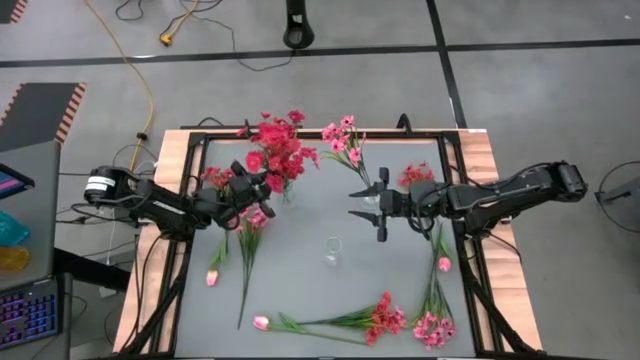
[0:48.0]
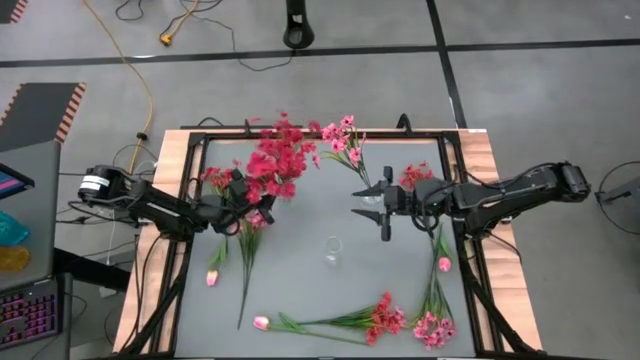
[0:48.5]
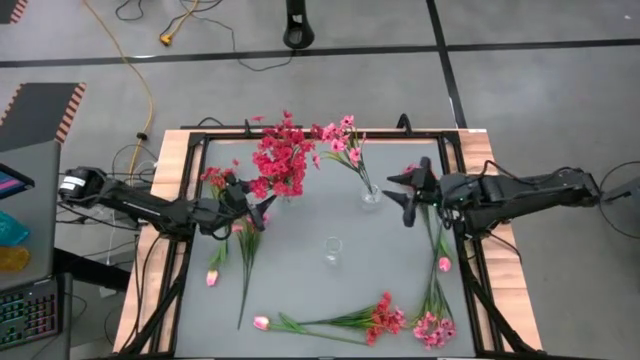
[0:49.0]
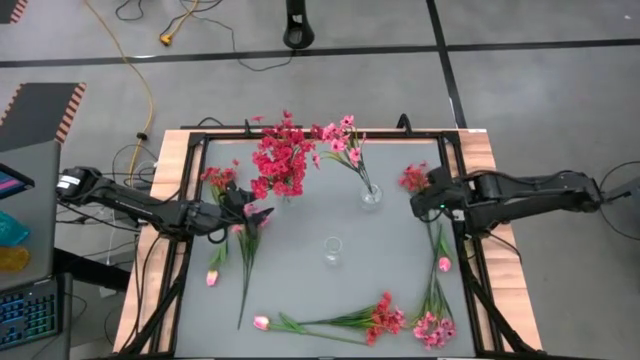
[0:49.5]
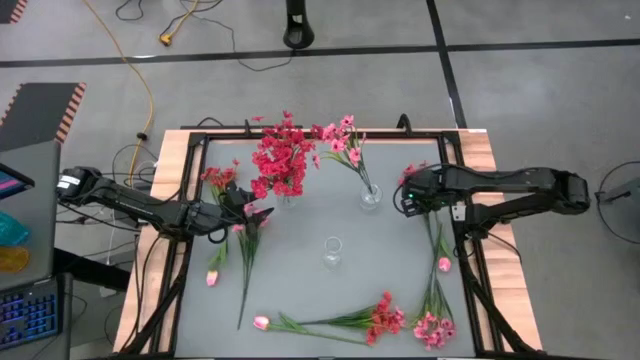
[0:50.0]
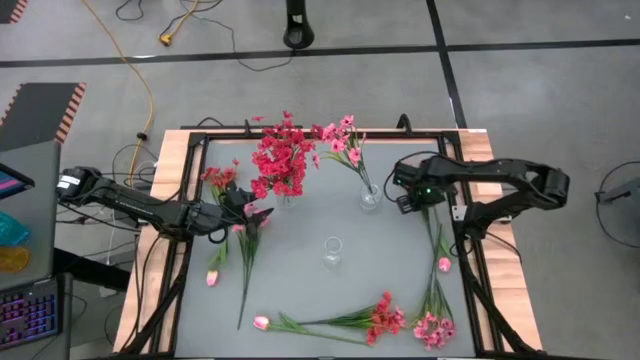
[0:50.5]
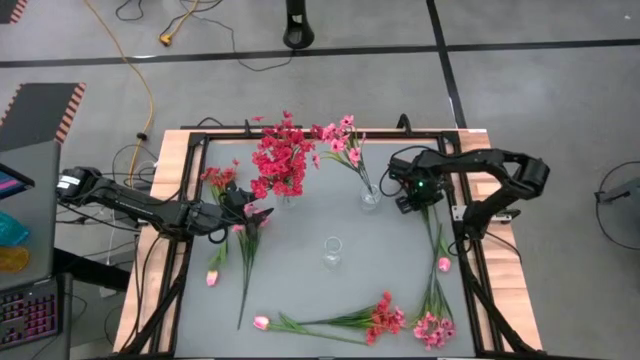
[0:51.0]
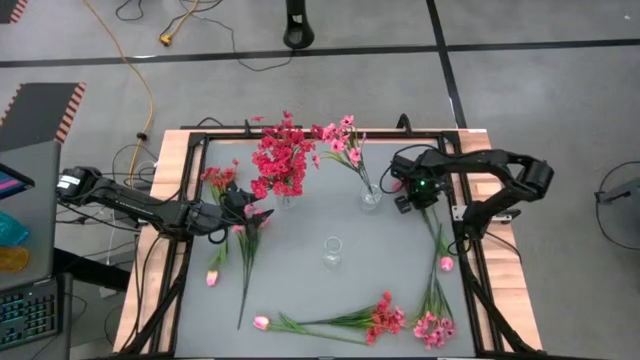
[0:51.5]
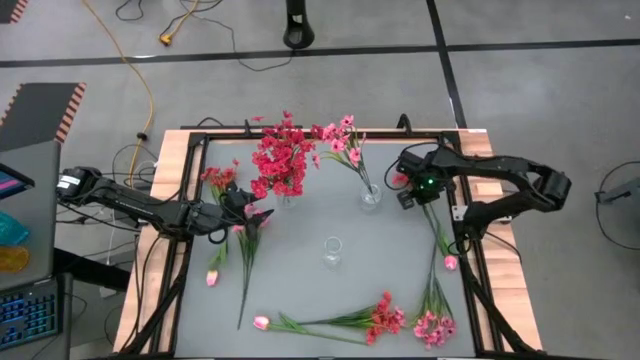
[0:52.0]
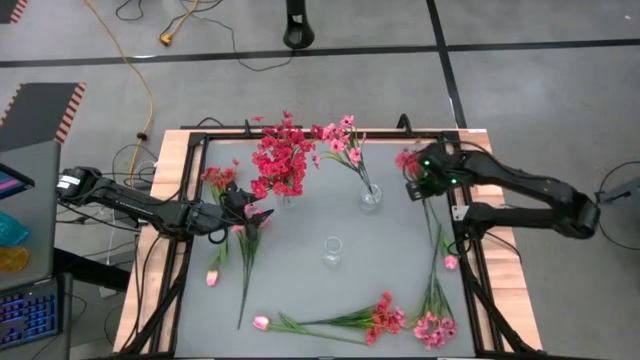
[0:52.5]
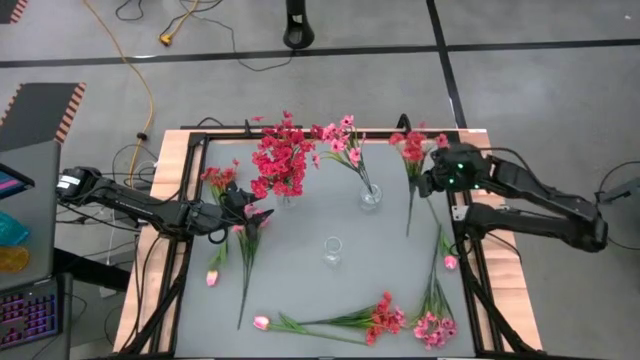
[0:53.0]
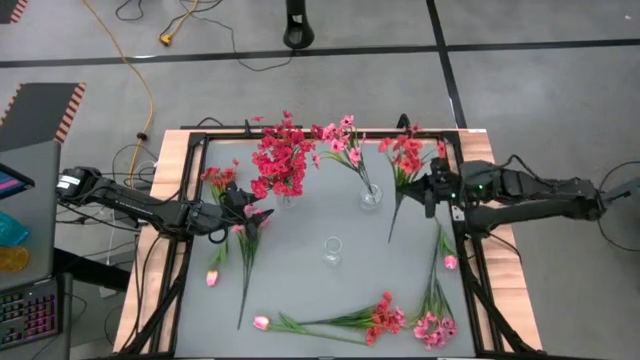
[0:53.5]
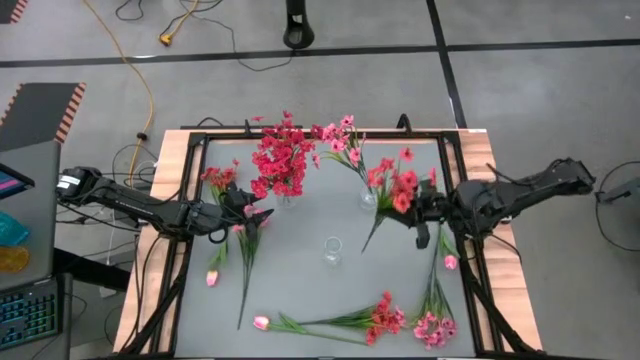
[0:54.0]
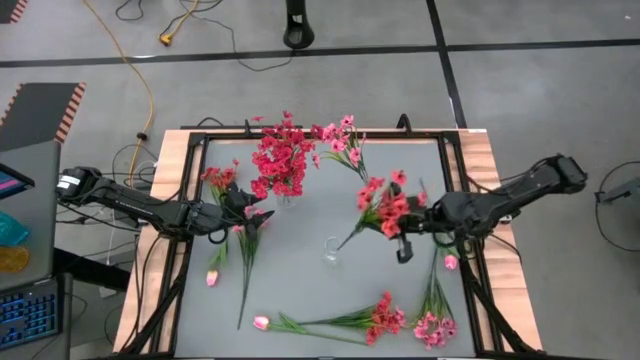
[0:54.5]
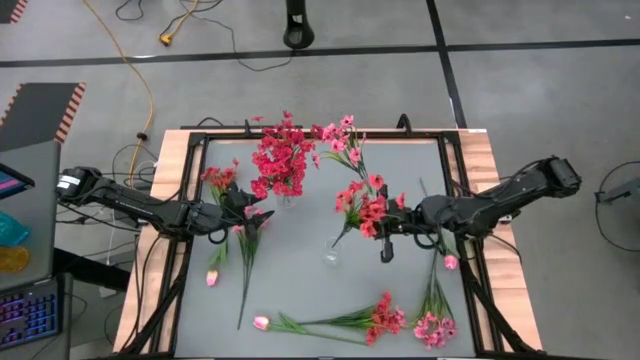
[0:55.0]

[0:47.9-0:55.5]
Task: Sort flowers into vase by color
Put the top right orange flowers into the bottom center transparent vase

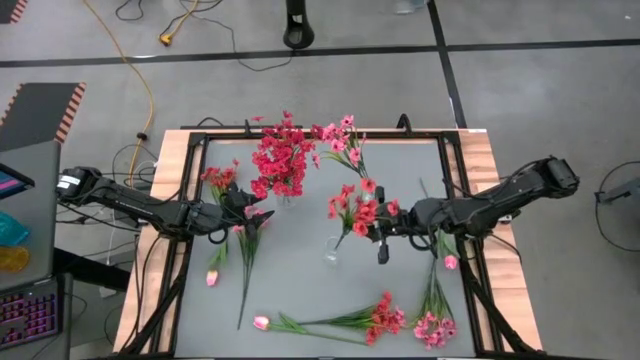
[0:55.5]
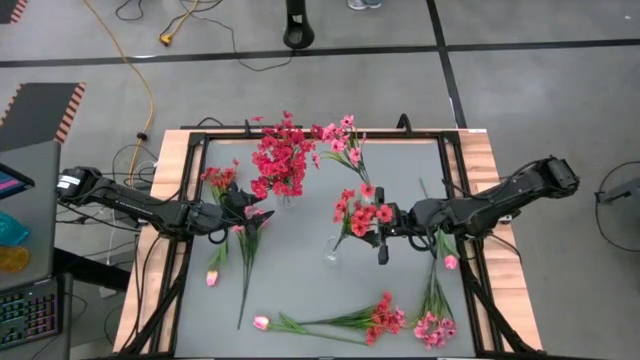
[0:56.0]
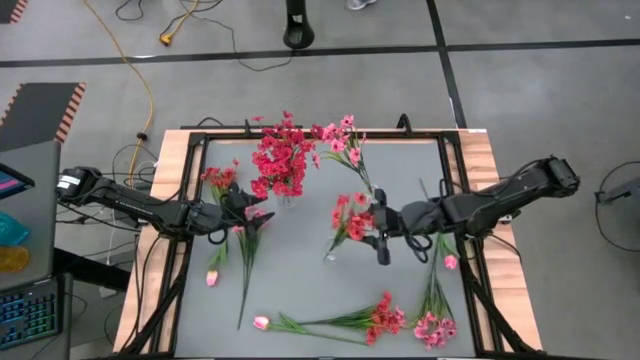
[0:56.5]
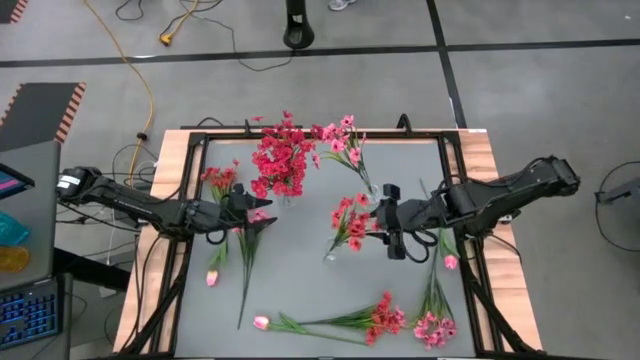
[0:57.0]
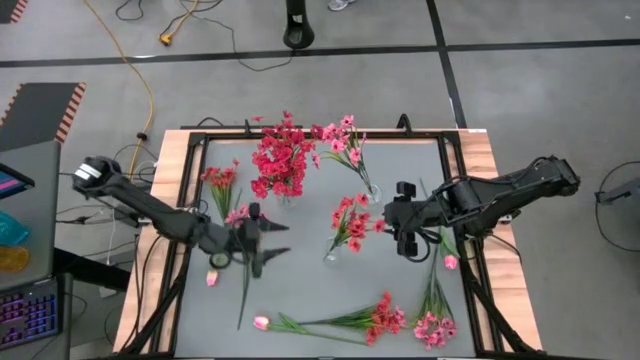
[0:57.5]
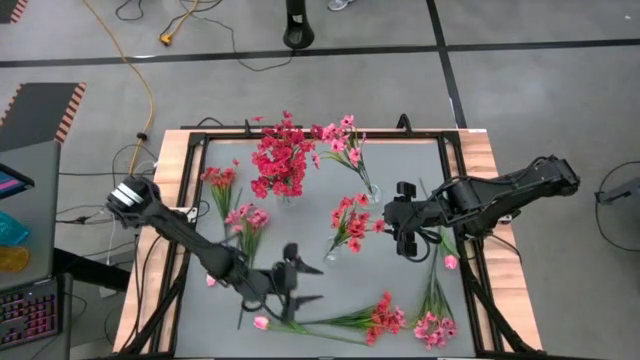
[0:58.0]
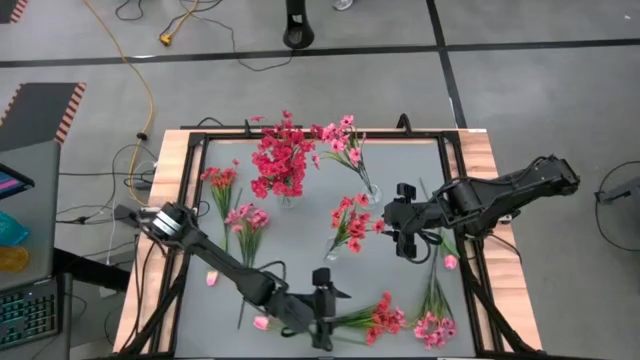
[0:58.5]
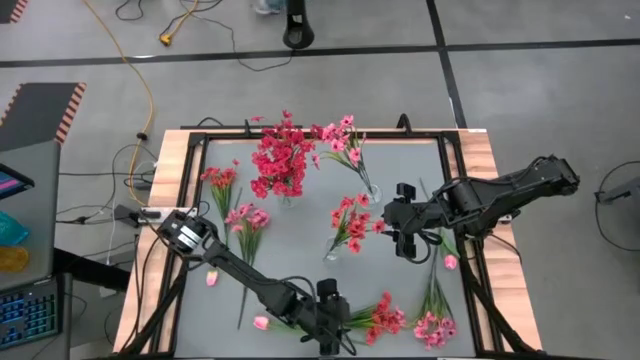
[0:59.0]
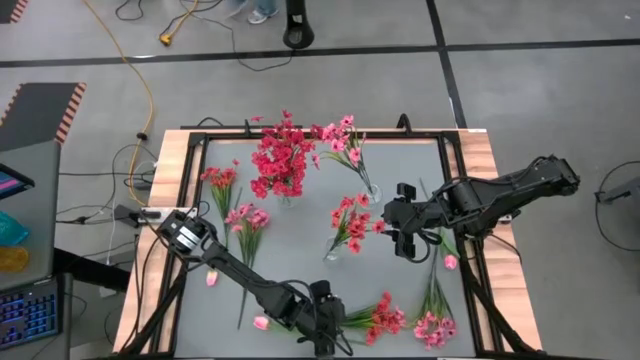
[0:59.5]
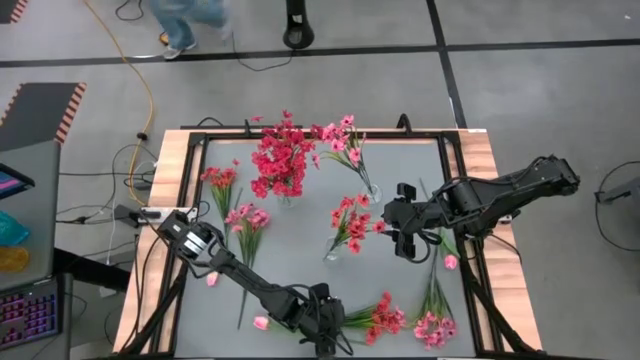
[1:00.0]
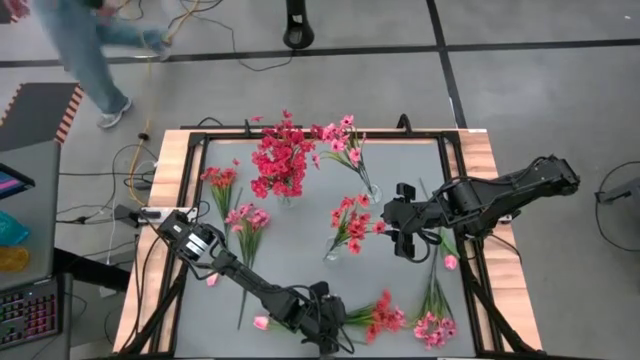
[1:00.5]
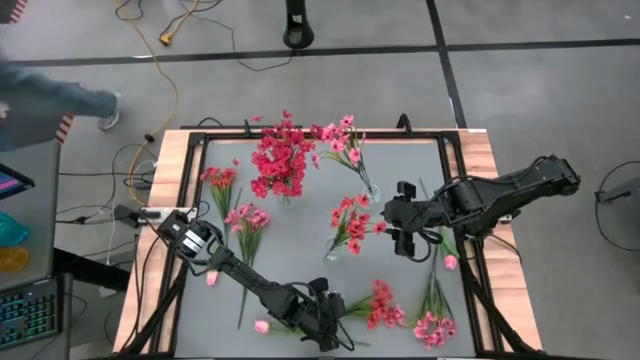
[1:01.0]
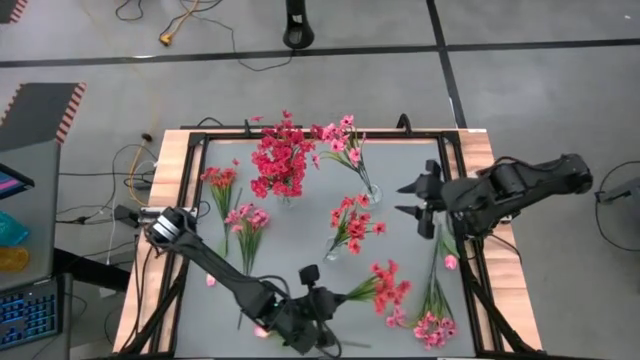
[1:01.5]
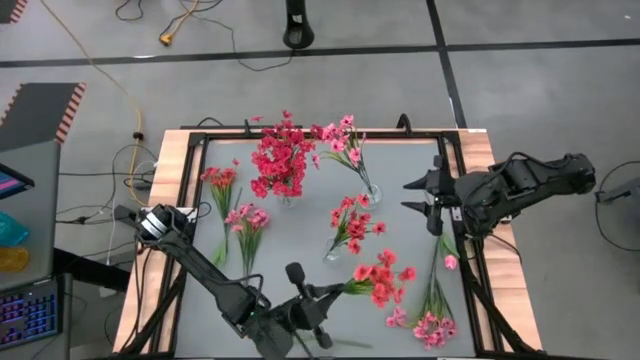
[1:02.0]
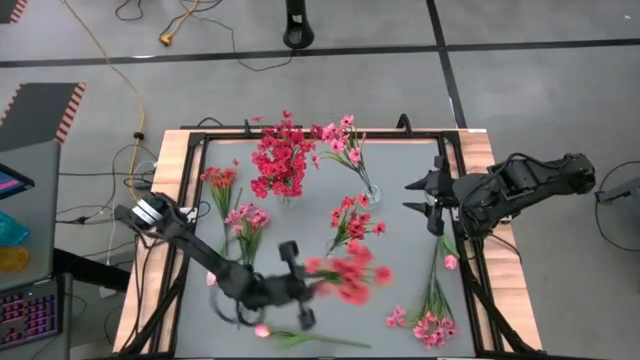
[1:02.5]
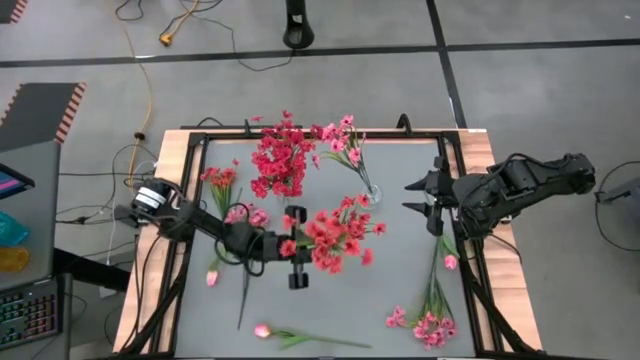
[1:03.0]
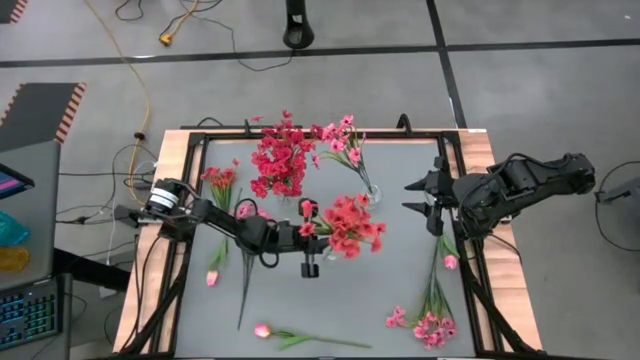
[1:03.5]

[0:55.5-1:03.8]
Put the bottom right orange flowers into the bottom center transparent vase

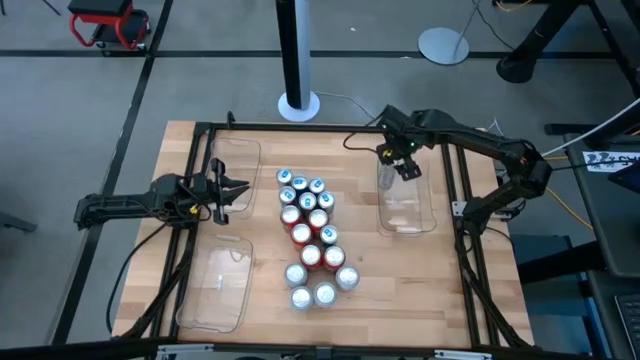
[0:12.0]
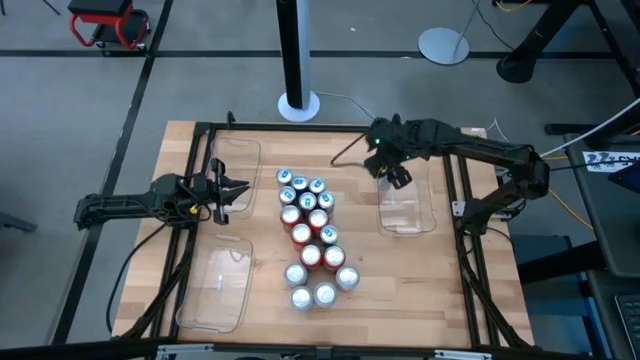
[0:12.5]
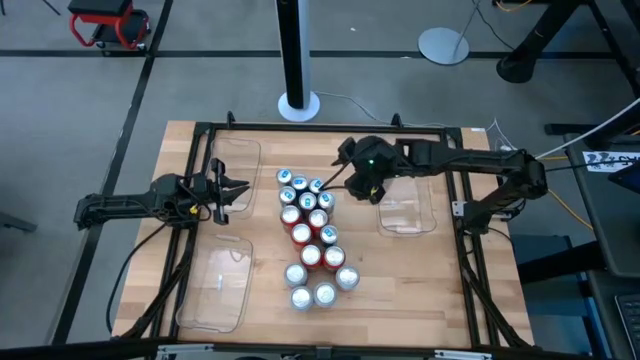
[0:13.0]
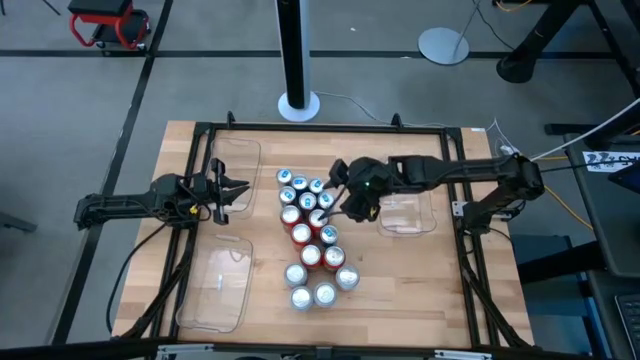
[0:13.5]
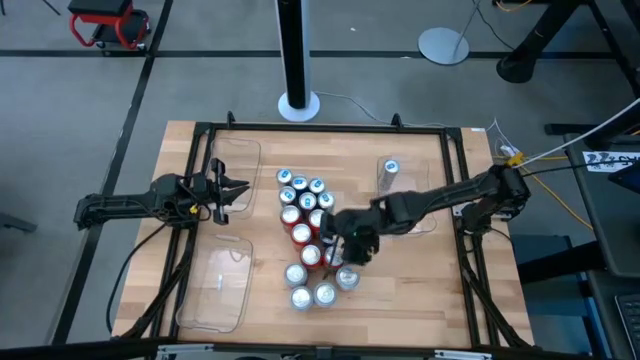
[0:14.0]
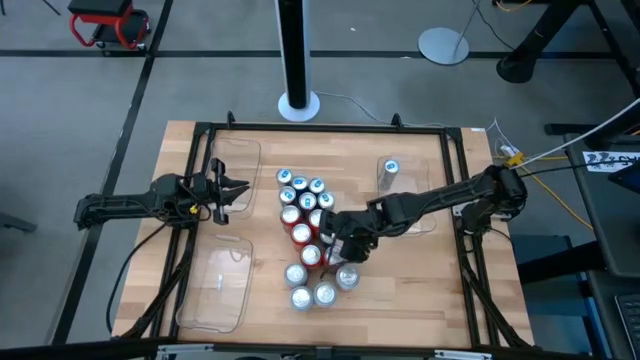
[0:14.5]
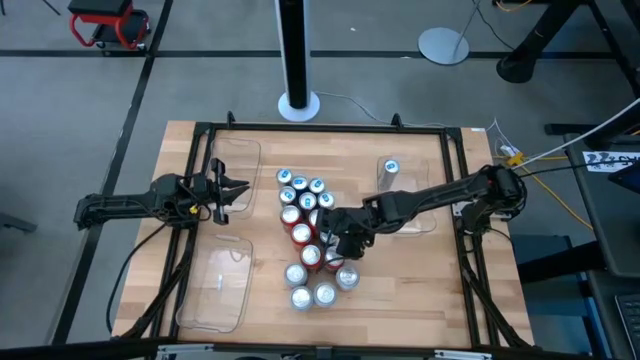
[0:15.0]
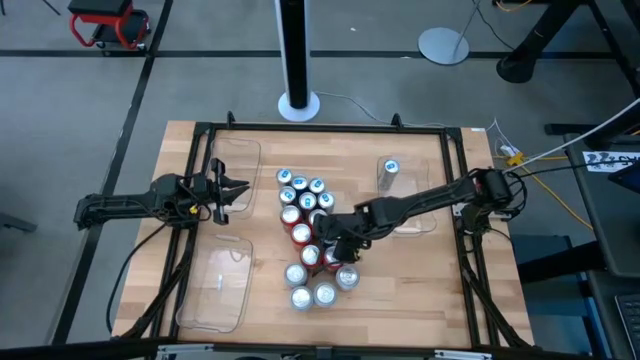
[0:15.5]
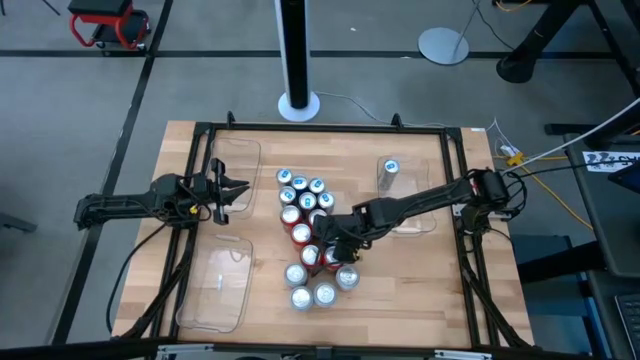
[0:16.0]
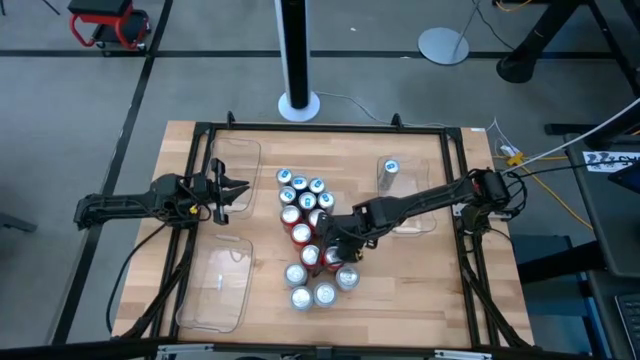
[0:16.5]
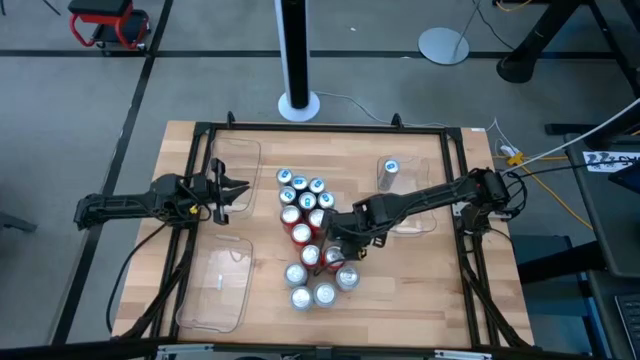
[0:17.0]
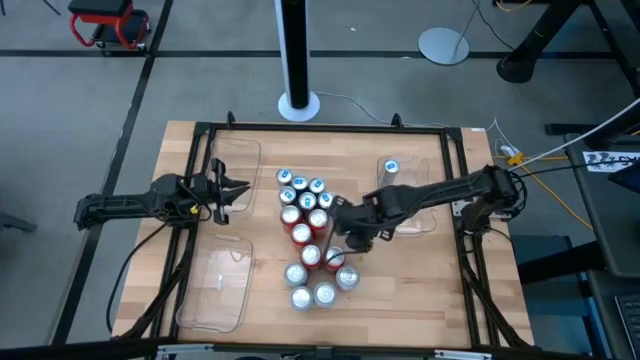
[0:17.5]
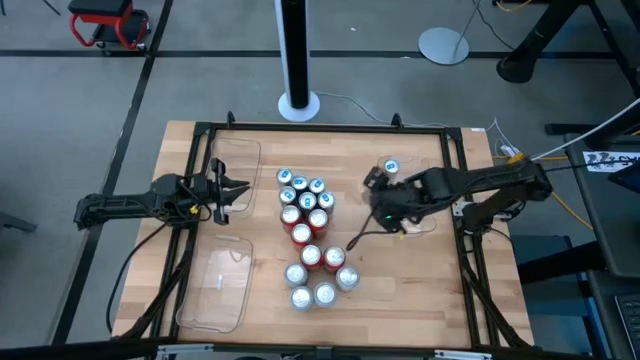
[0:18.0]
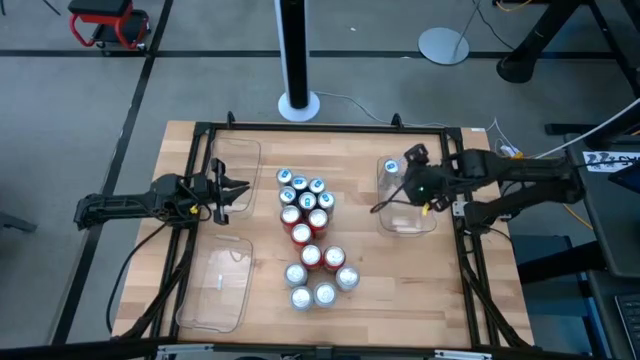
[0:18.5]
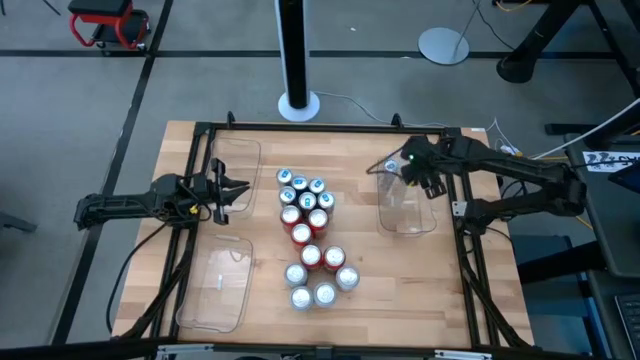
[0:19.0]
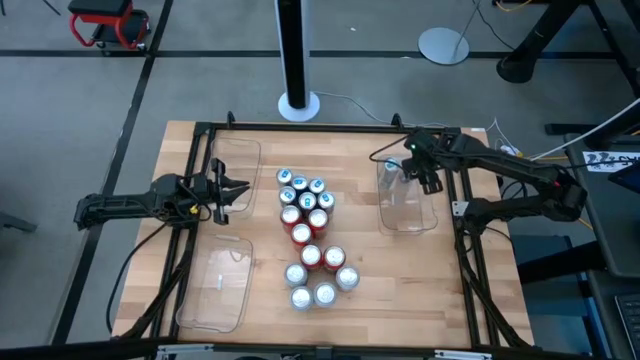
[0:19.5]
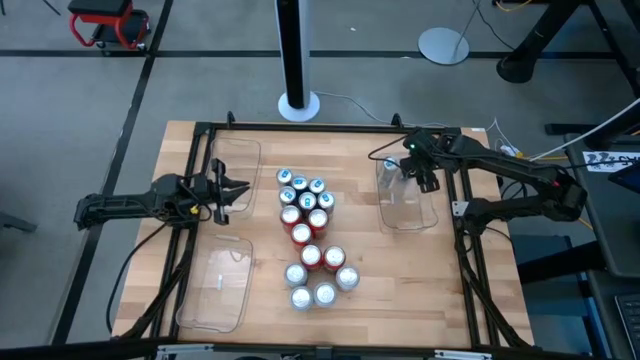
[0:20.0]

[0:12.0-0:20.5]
Task: Sort soda cans
Put the blue soda can into the middle right transparent bin
